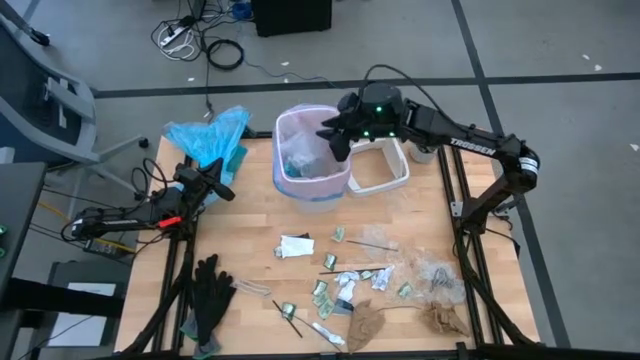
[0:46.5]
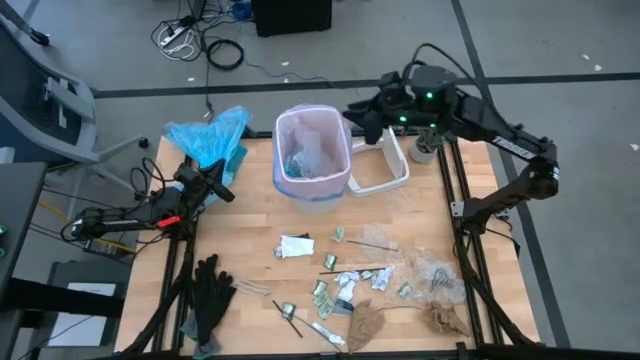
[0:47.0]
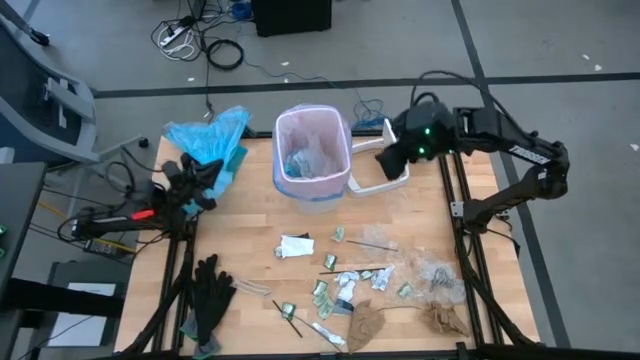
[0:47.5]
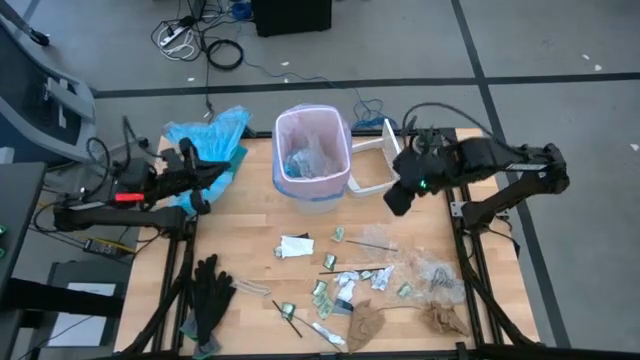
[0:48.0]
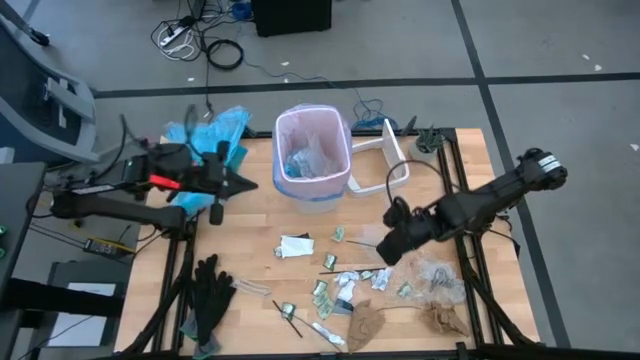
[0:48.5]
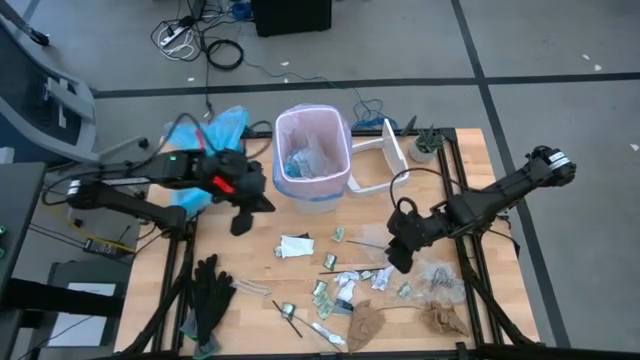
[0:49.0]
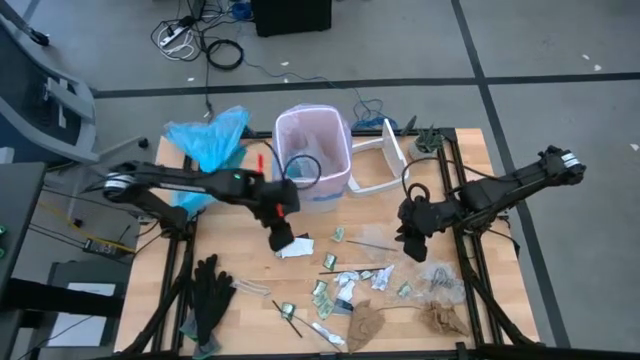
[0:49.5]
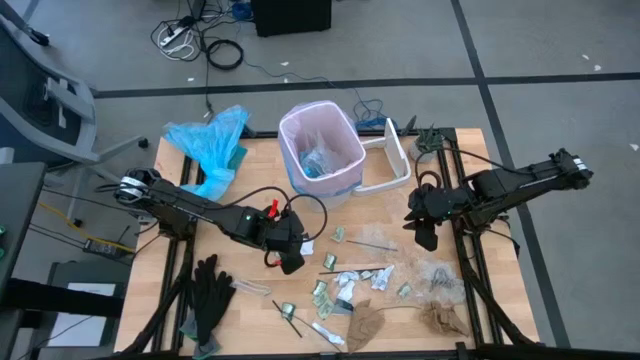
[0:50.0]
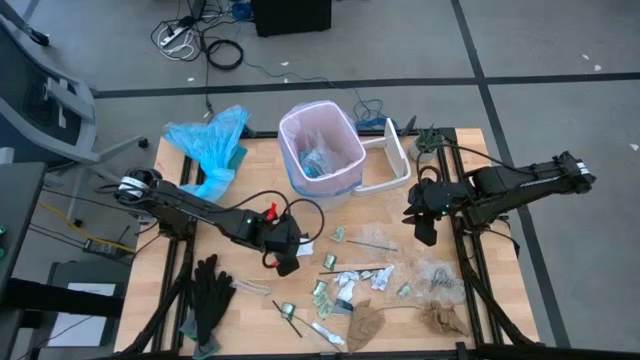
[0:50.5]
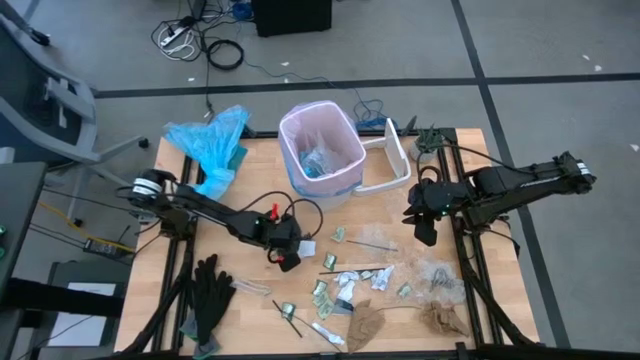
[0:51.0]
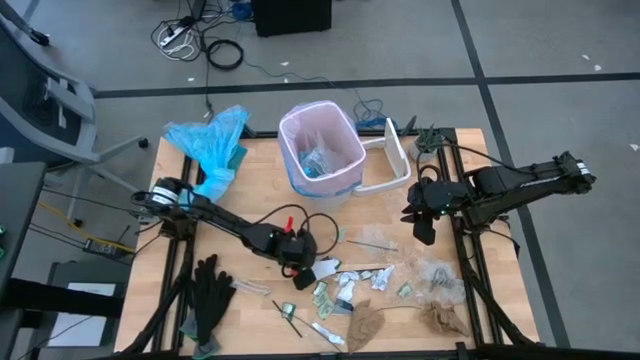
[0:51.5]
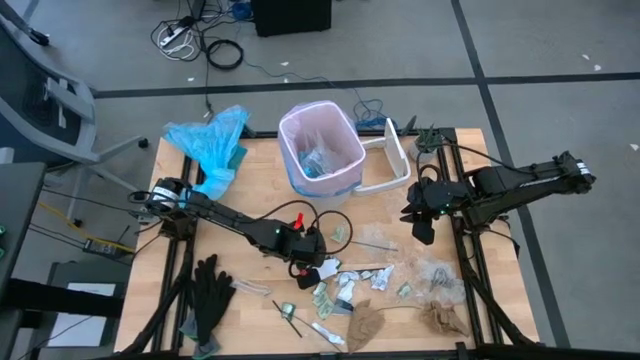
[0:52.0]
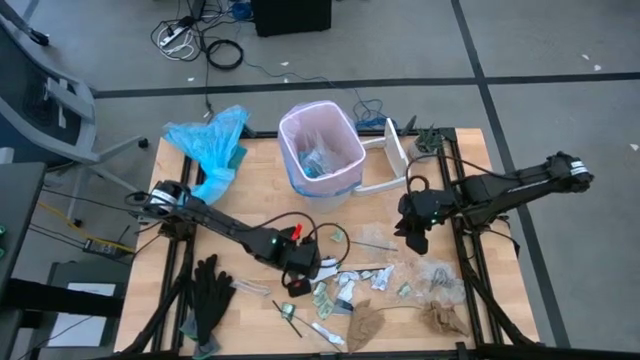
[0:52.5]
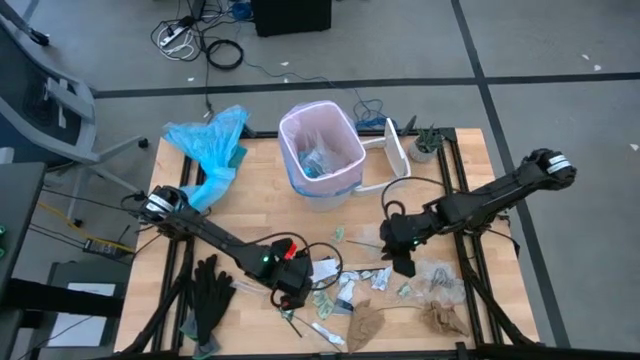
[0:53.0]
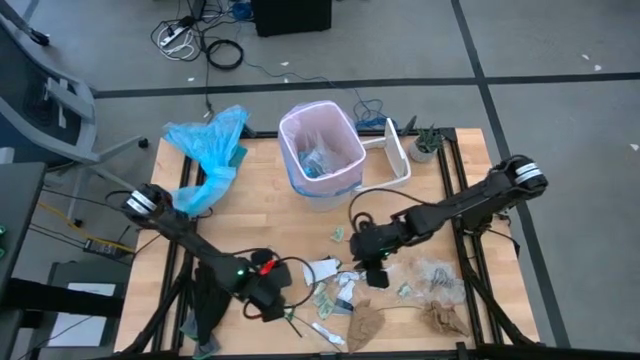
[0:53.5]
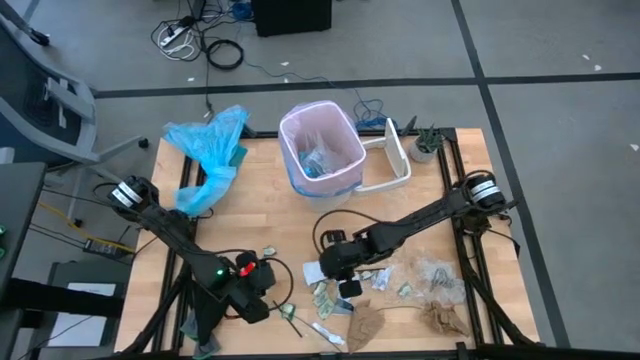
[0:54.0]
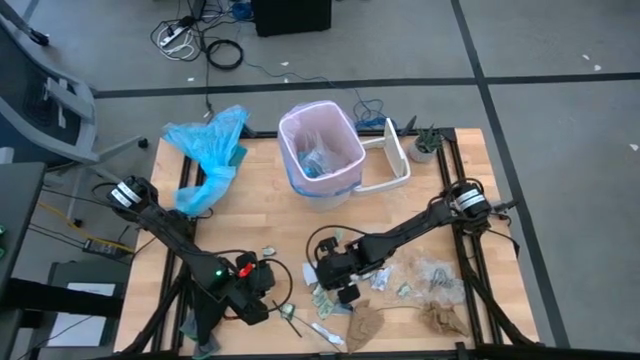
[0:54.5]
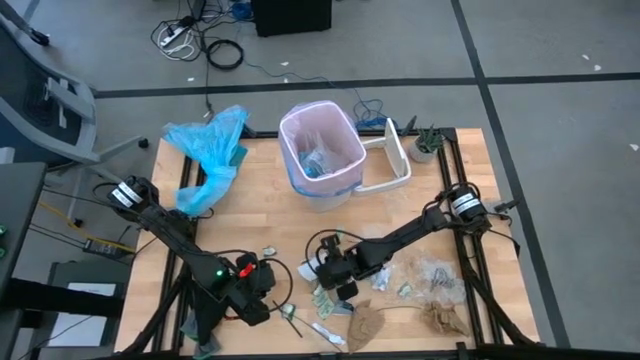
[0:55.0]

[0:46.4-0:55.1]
Task: place trash/remove bag and relplace
Put the blue carton paper into the trash bin

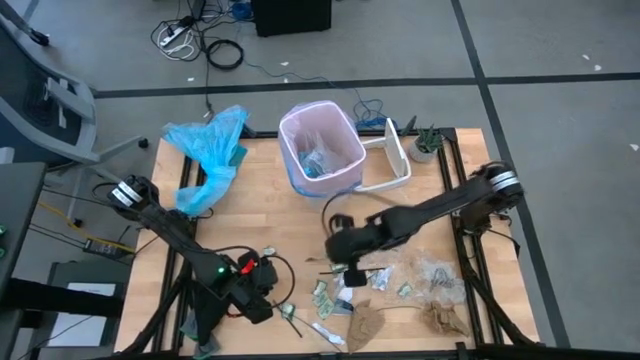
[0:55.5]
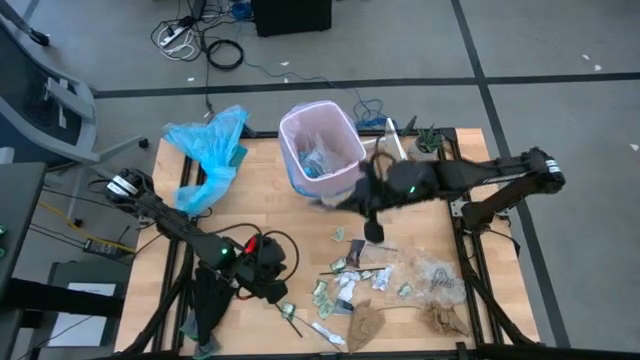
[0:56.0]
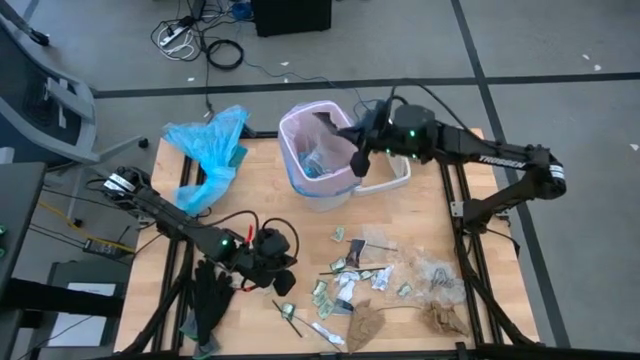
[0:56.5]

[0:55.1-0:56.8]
Put the blue carton paper into the trash bin

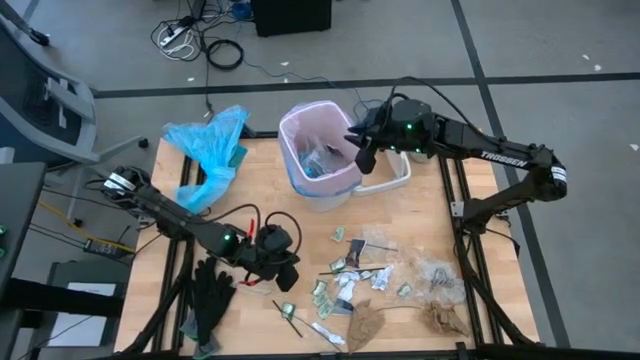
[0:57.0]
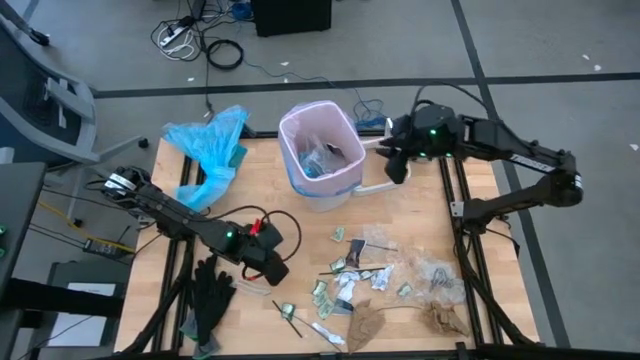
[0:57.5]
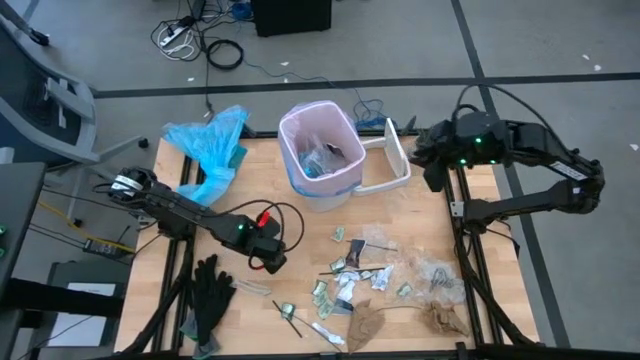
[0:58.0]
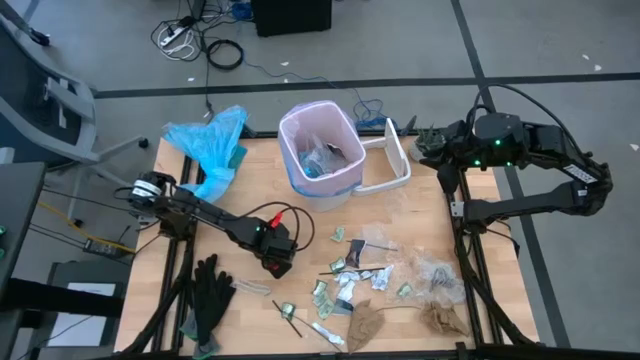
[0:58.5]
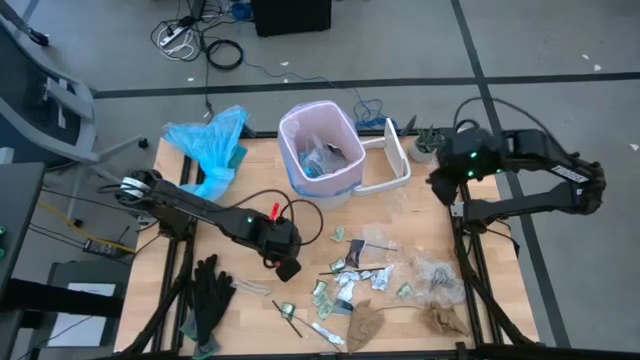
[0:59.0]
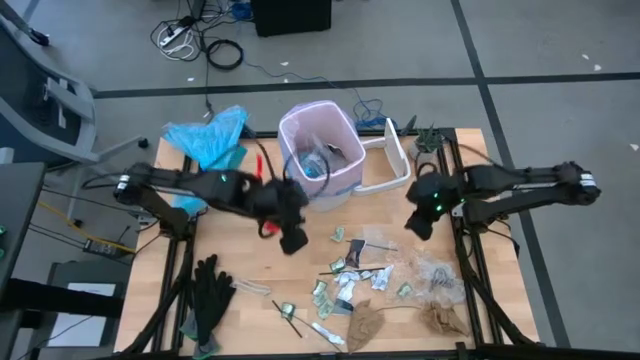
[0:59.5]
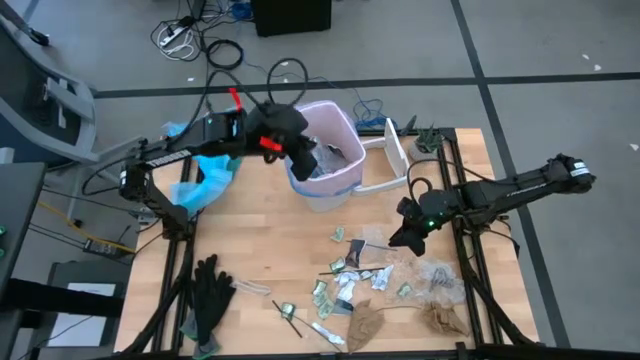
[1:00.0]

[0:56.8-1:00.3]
Put the green paper into the trash bin

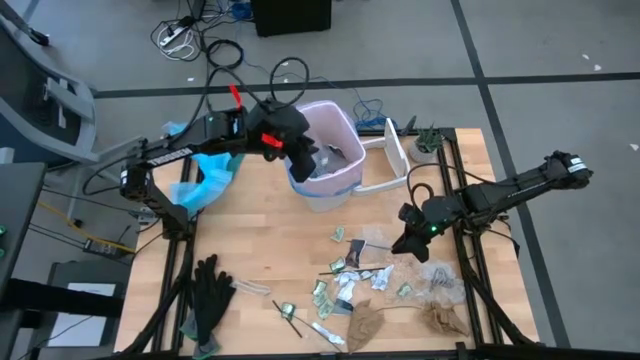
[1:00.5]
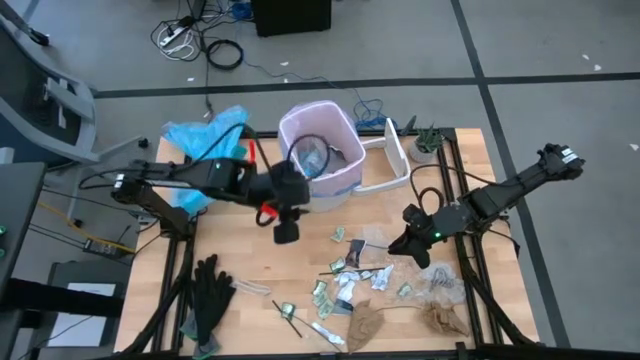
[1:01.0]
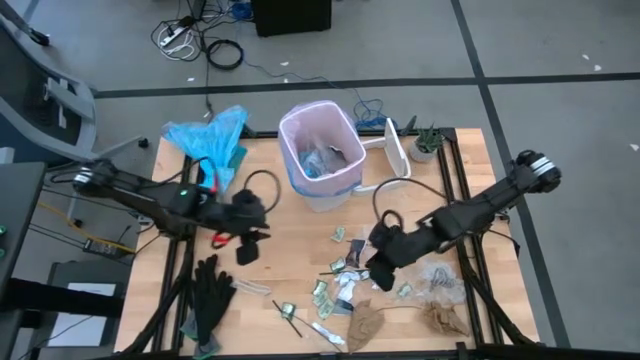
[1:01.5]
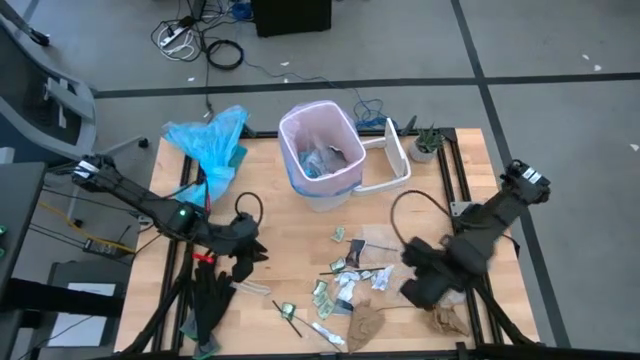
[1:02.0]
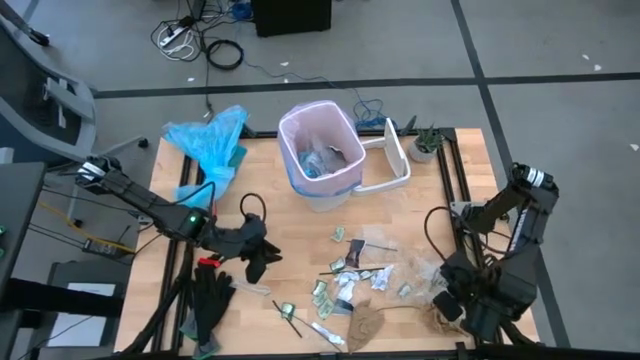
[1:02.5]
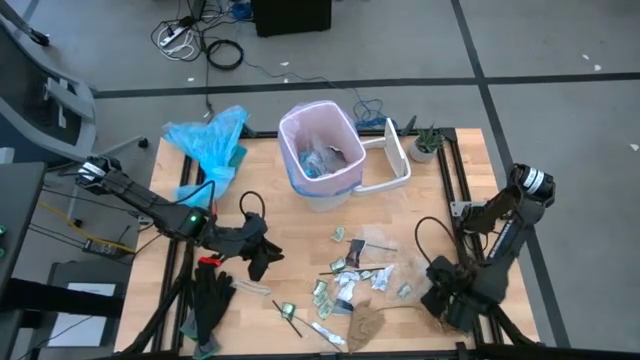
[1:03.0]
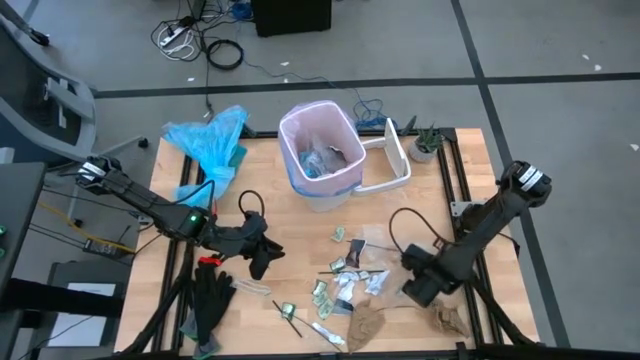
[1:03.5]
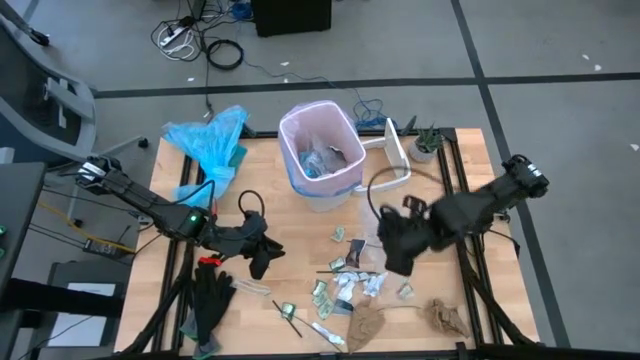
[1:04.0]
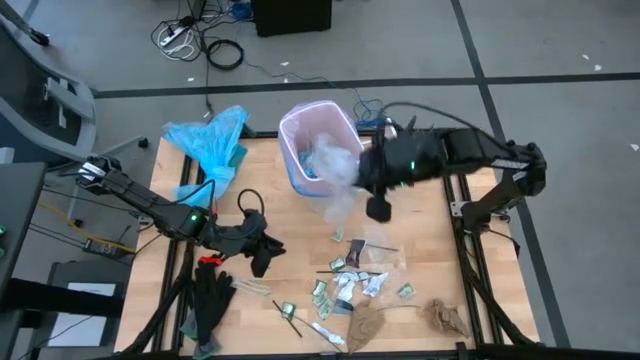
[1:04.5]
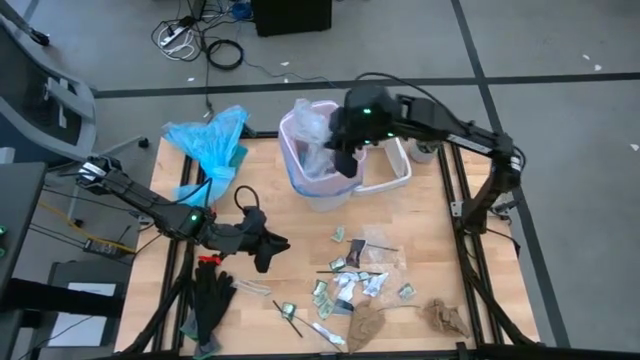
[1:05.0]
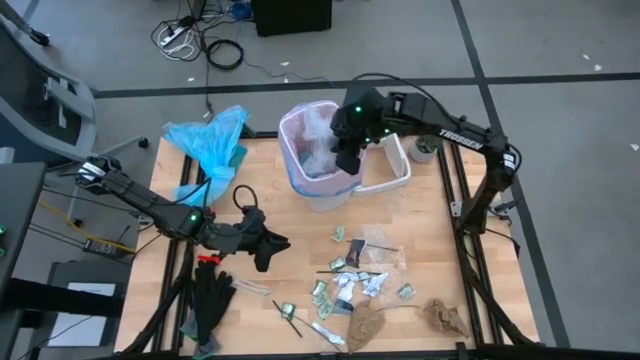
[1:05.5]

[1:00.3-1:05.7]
Put the clear cellophane into the trash bin

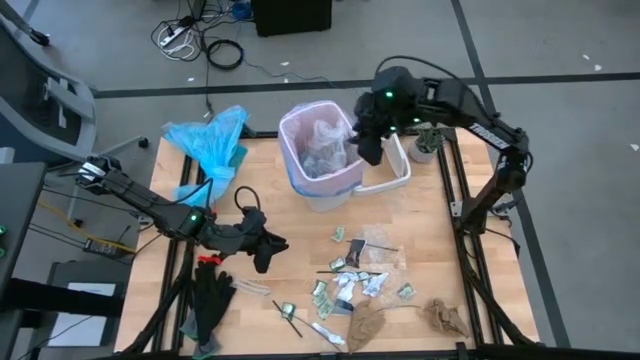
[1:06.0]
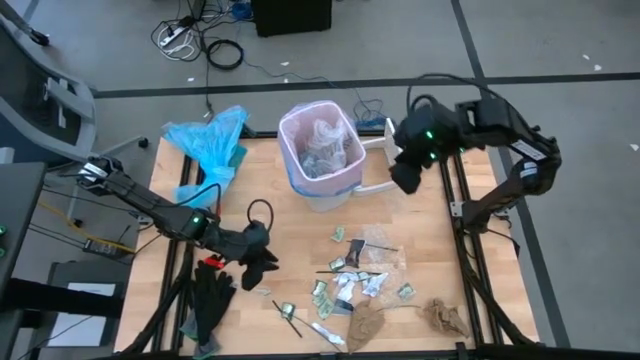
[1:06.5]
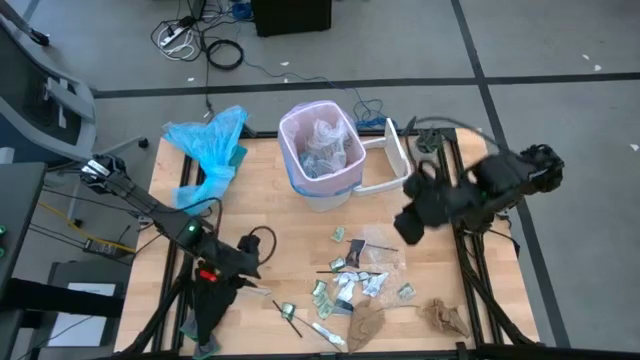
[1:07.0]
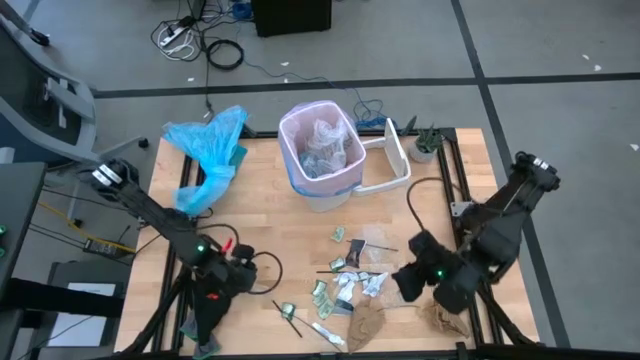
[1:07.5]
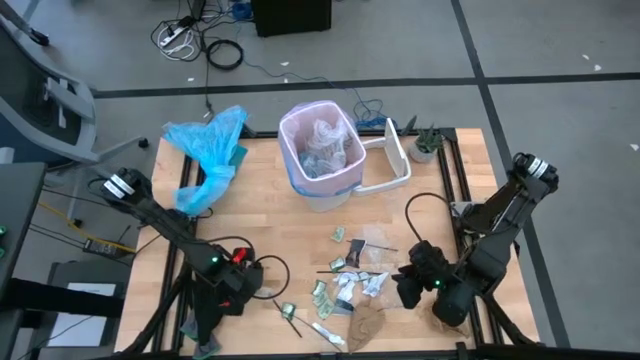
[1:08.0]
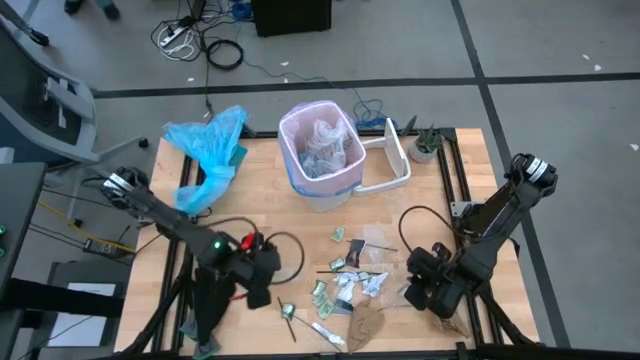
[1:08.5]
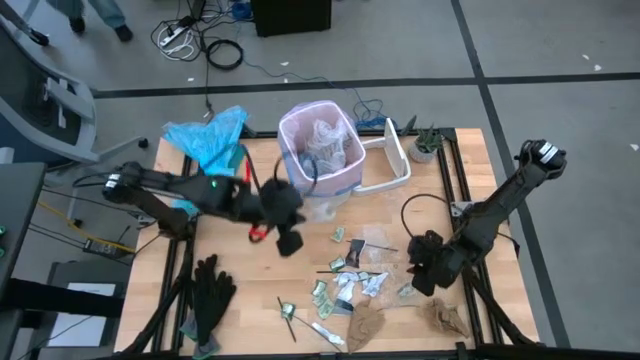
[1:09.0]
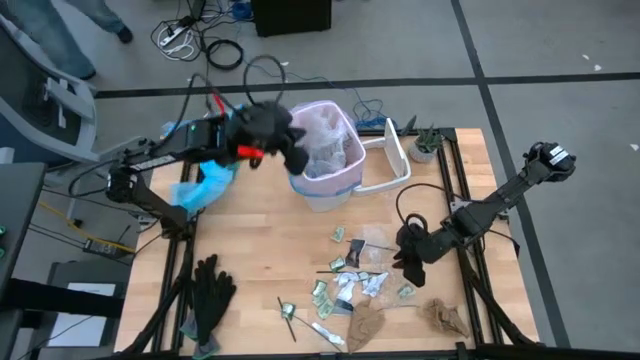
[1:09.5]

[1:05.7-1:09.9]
Put the clear cellophane into the white trash bin
